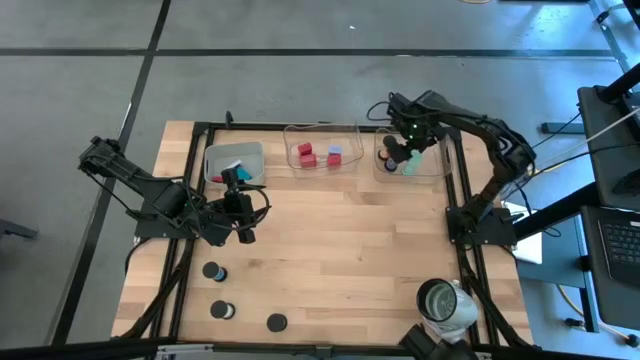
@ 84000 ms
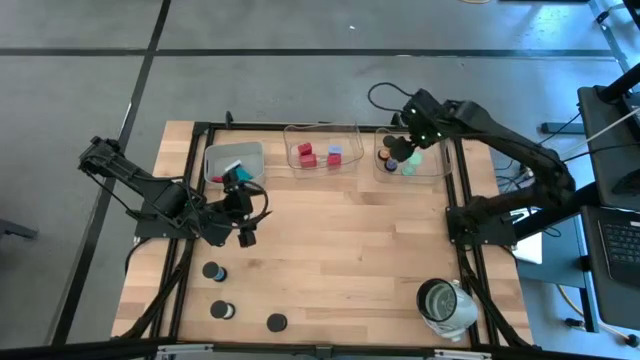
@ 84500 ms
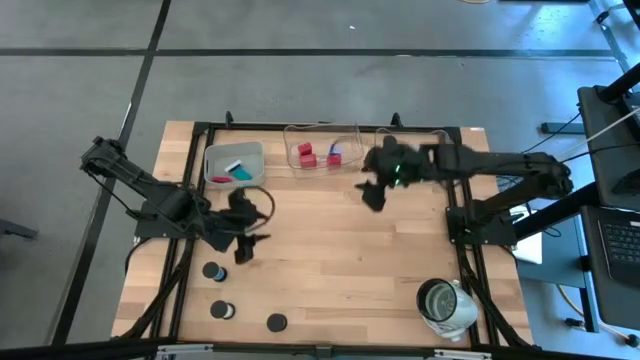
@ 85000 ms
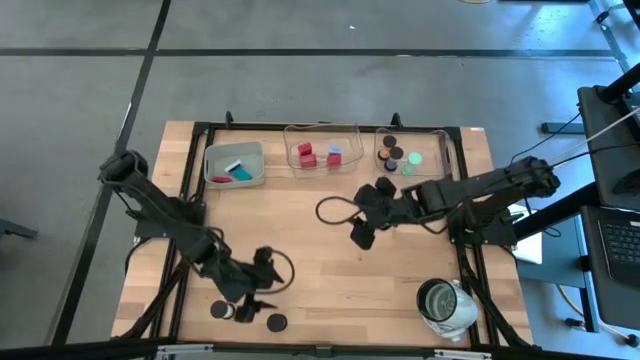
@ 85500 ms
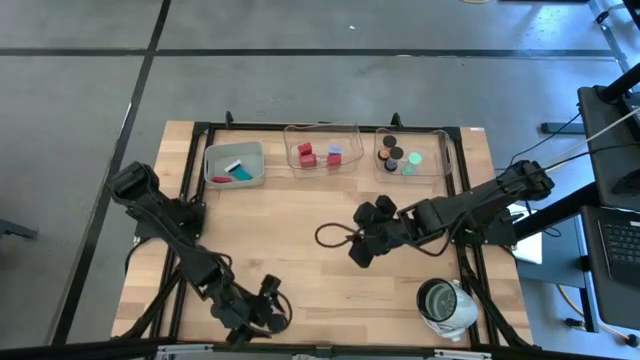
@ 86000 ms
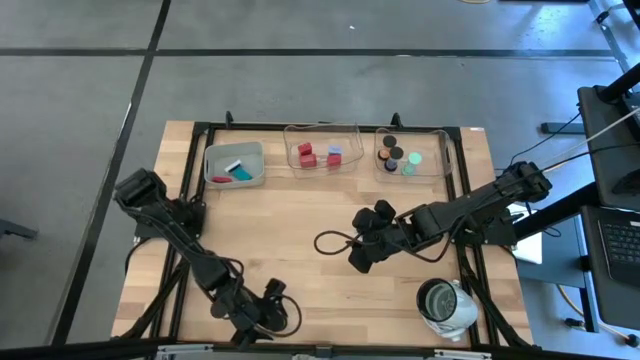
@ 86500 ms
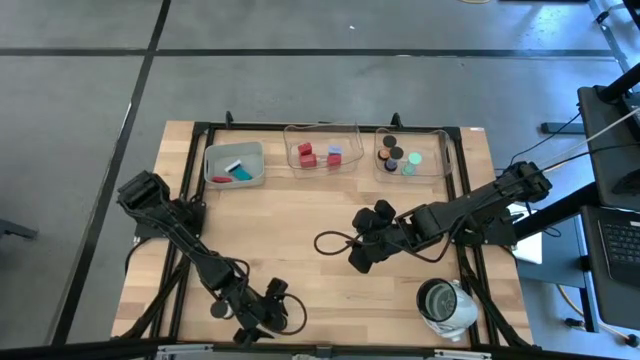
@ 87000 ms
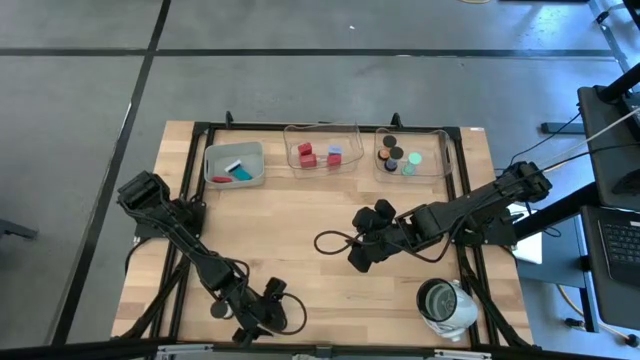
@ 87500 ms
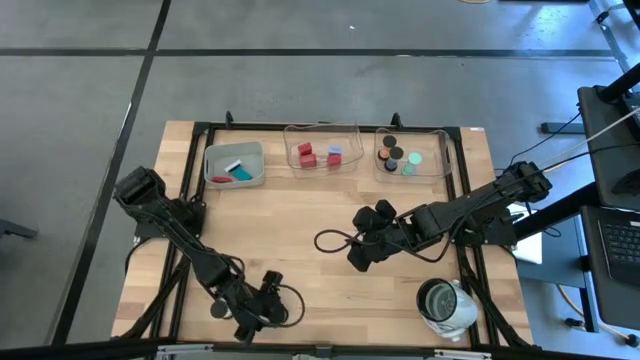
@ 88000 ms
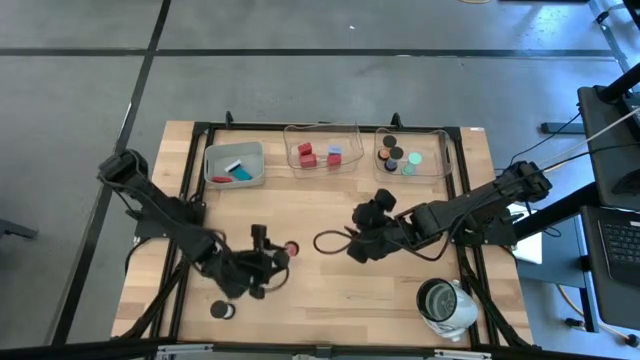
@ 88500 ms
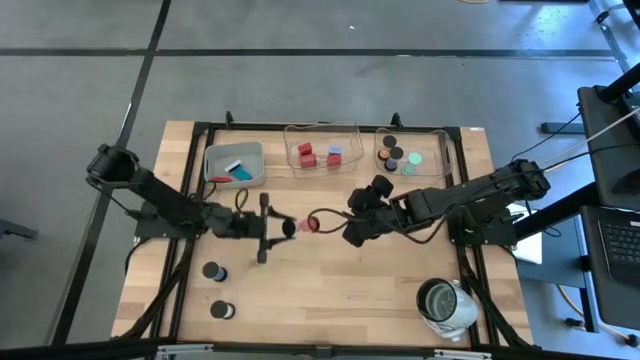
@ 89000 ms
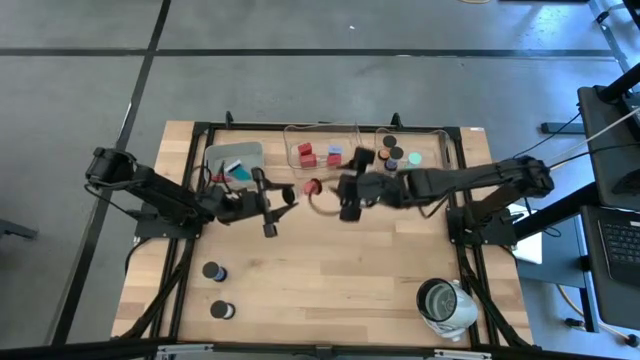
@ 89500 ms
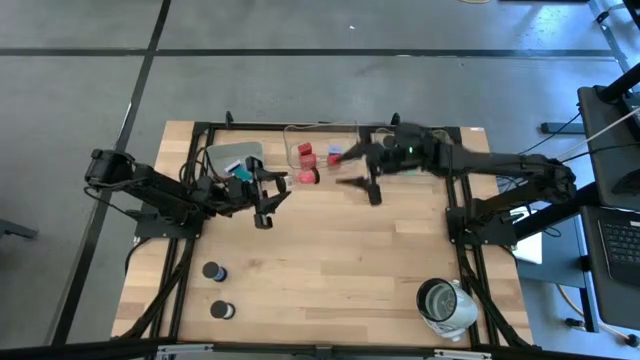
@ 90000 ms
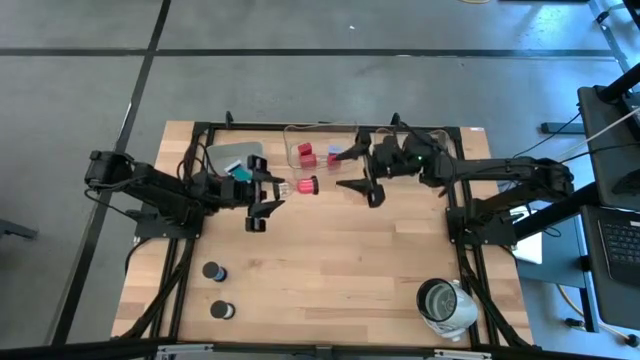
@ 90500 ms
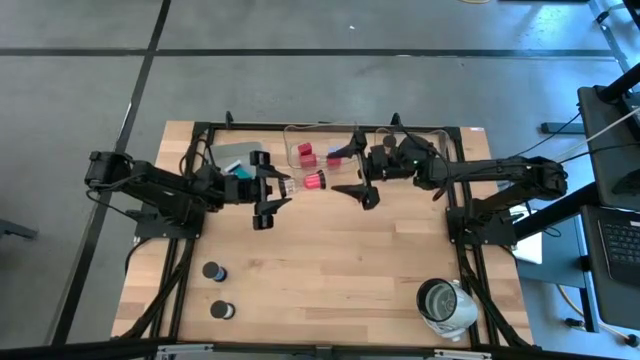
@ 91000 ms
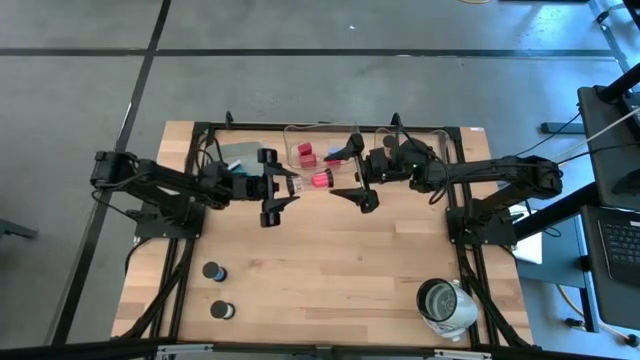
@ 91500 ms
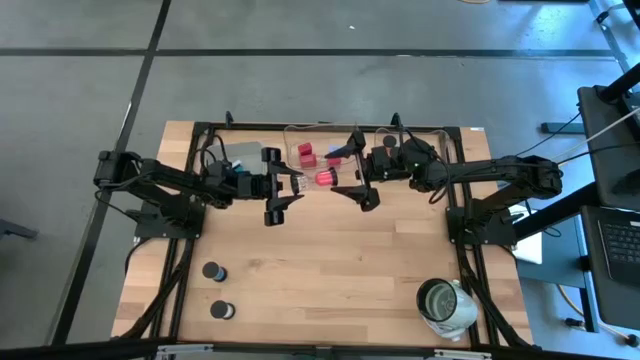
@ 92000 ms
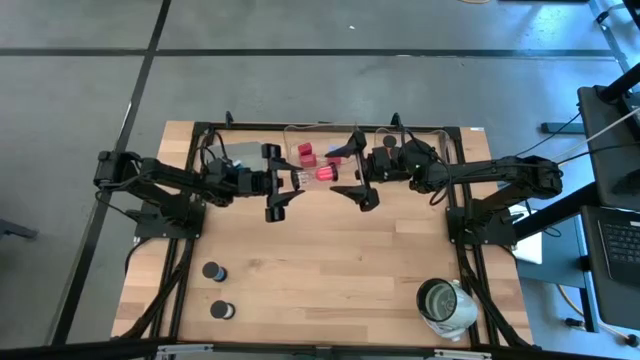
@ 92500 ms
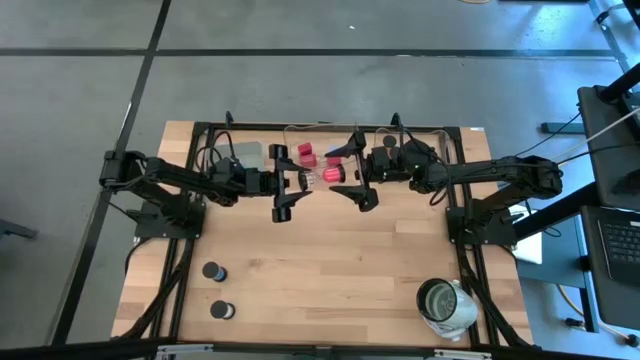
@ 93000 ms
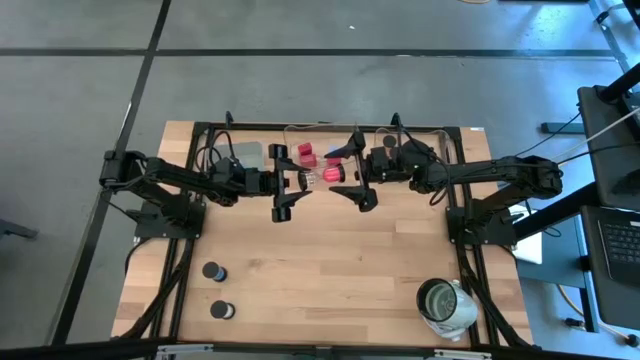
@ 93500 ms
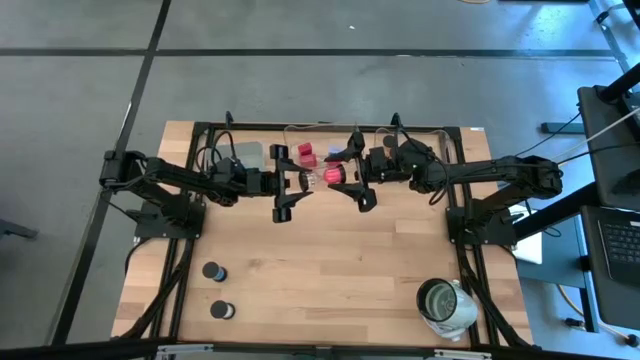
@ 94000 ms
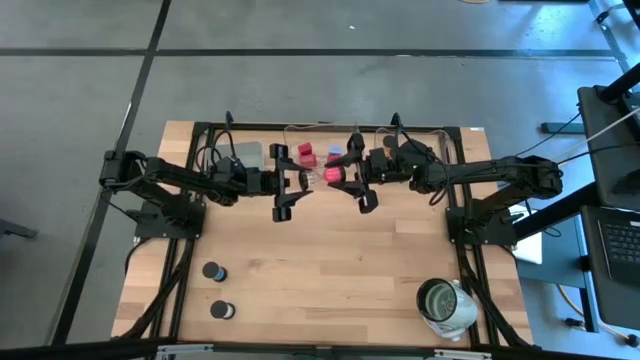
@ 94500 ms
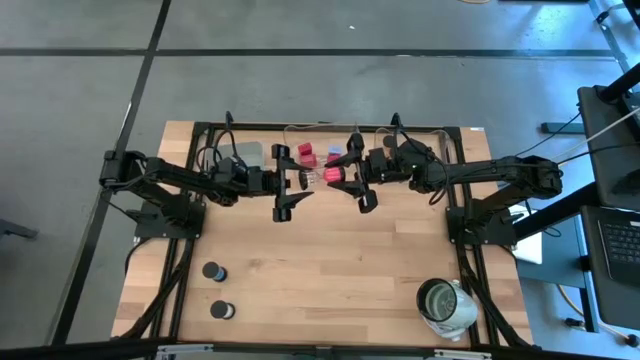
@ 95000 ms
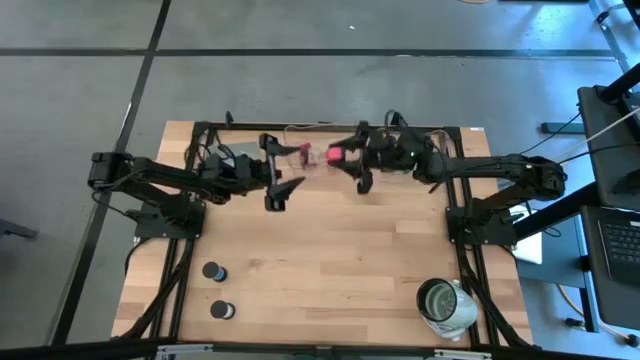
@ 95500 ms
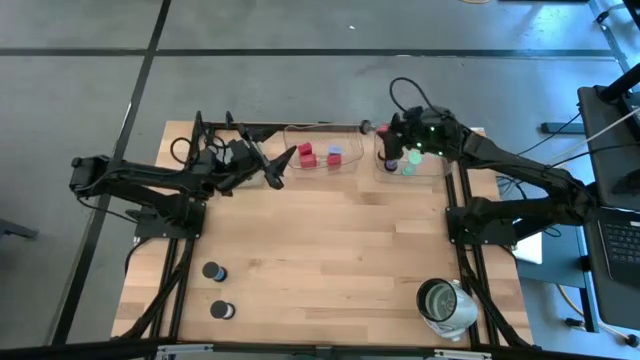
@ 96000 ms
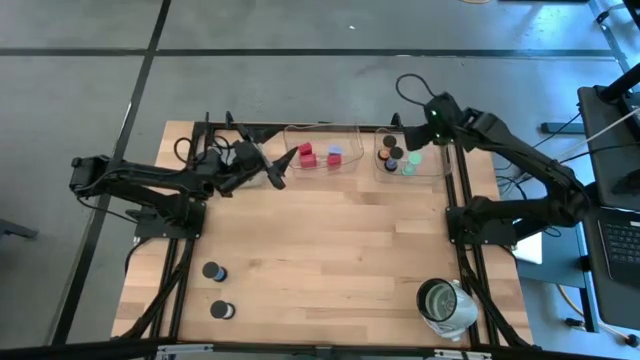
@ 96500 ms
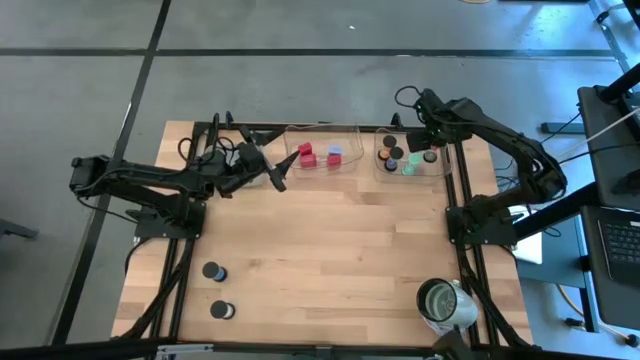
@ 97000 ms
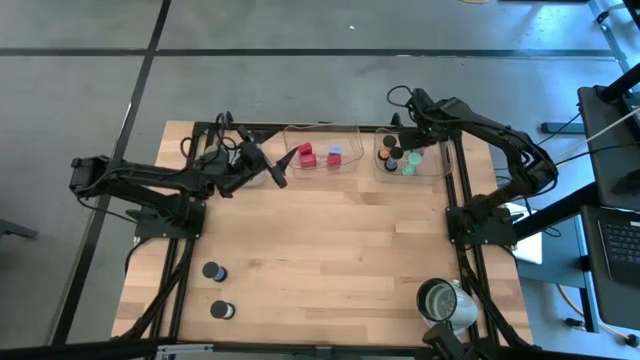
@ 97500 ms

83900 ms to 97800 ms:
Task: Pick & Place Office items
Put the red hourglass into the right transparent bin

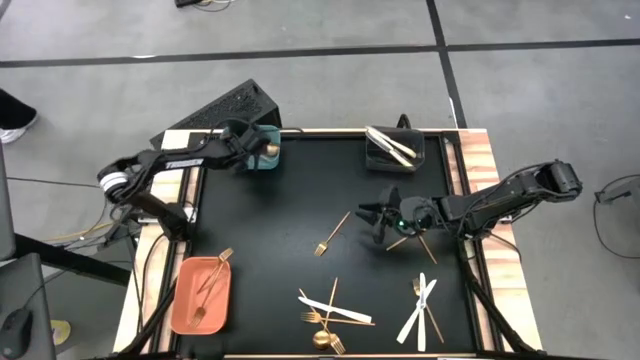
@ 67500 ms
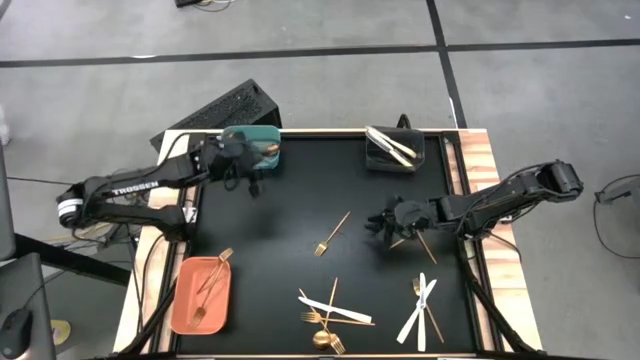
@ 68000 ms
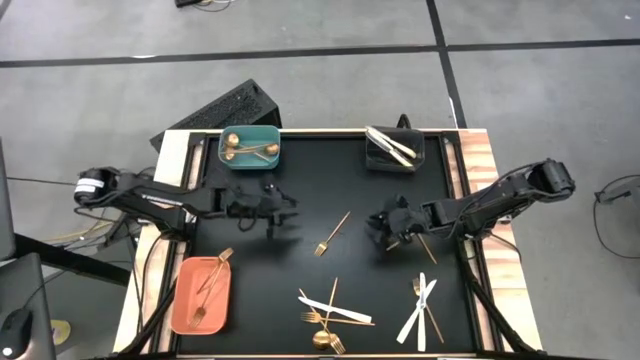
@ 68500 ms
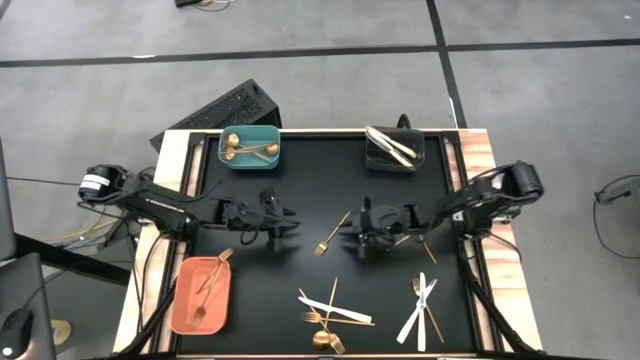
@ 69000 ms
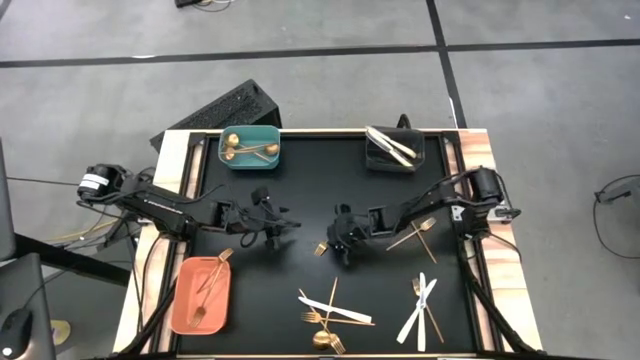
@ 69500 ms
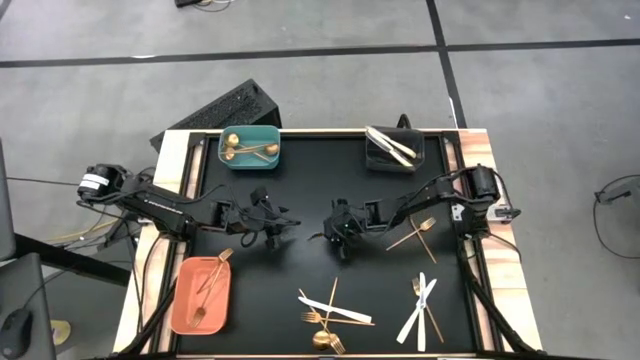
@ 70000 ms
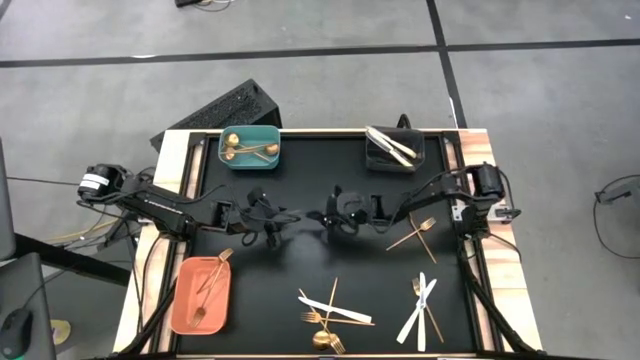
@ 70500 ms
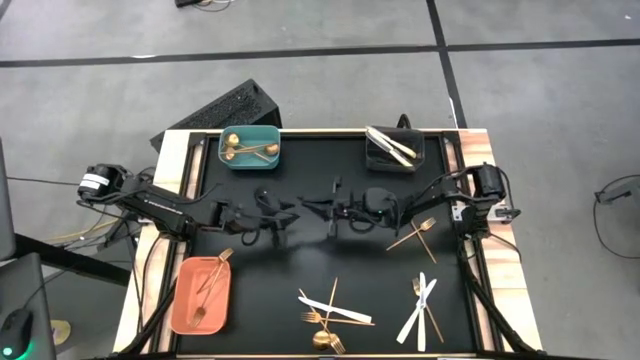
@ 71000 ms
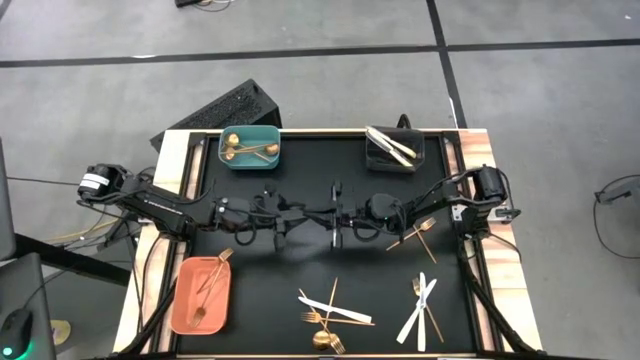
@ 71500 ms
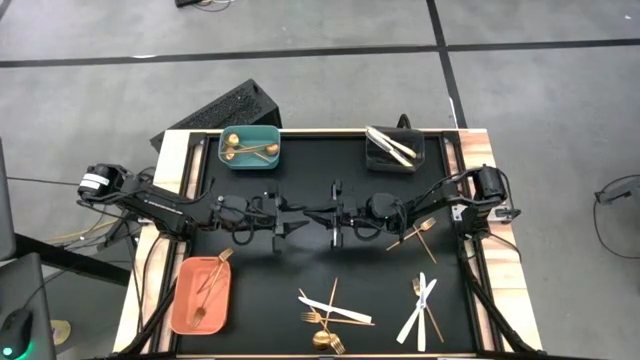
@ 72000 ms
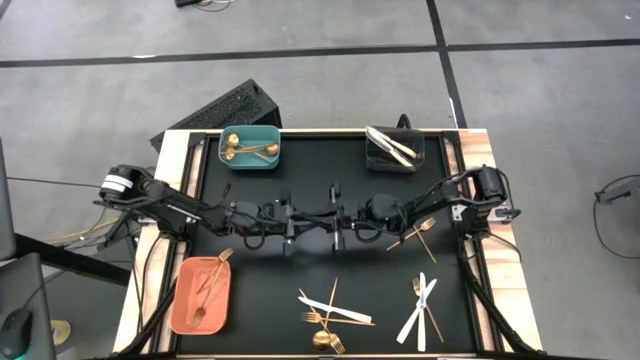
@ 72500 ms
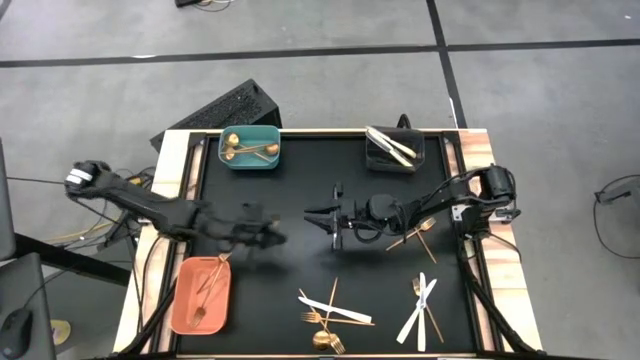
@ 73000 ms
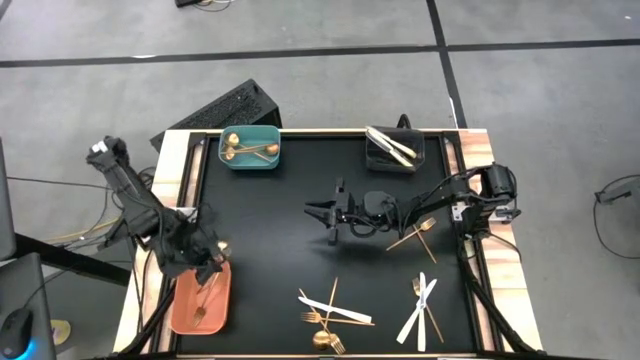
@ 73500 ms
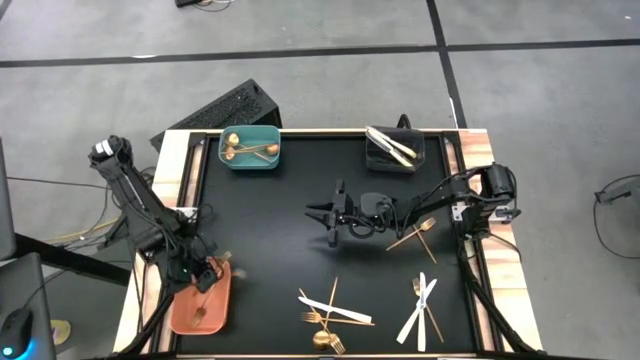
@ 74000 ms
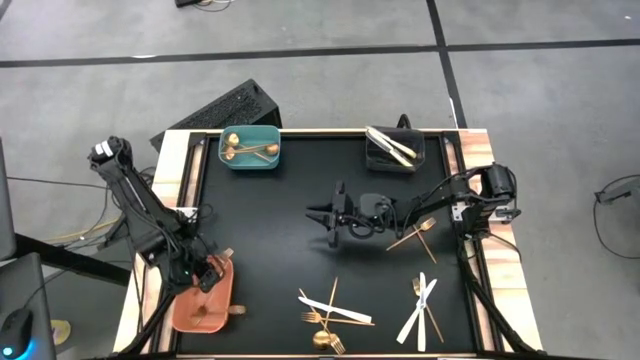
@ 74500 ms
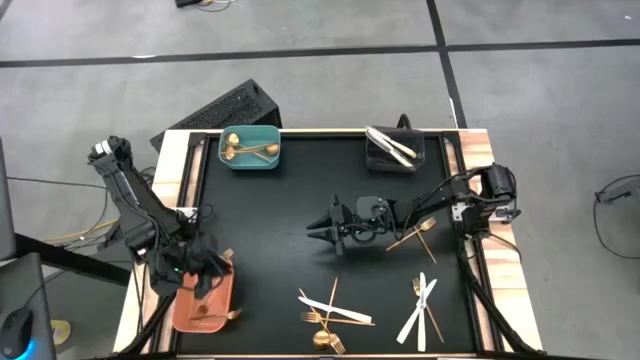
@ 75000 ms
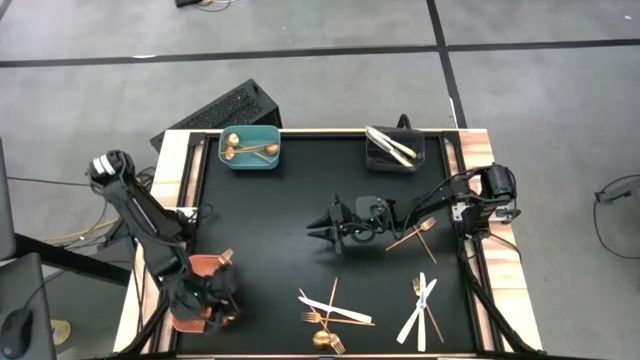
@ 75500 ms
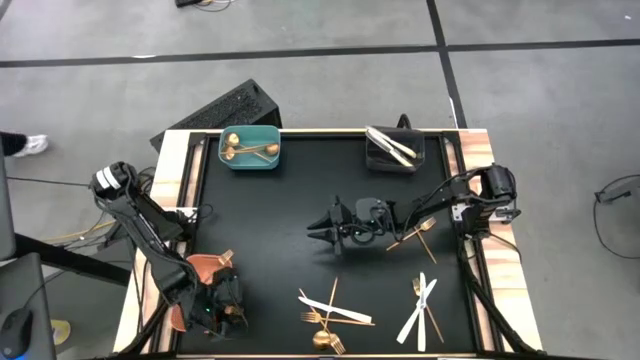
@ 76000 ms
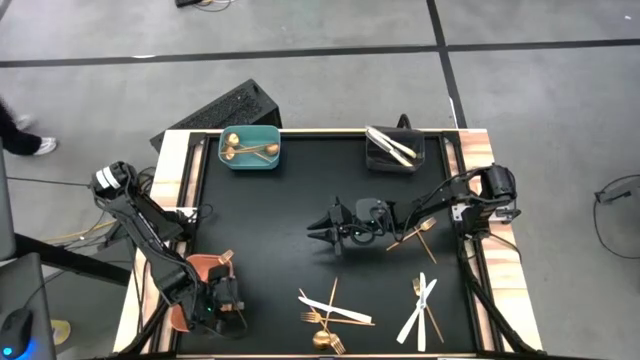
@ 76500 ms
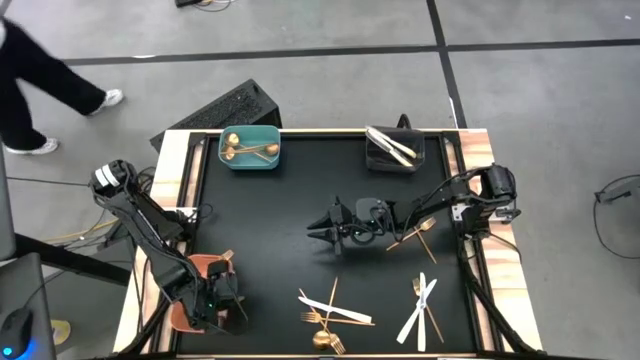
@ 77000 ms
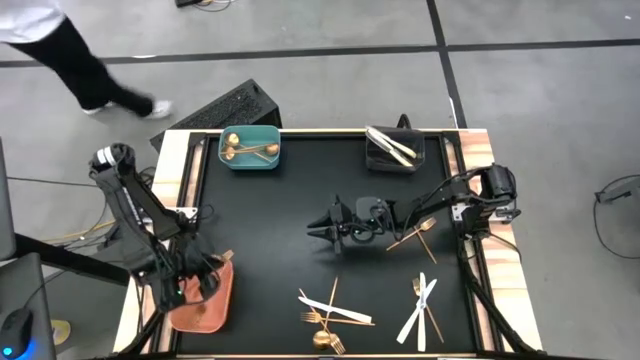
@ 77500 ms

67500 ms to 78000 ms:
Task: Sort silverware by color (type)
Put the gold fork into the orange bin
